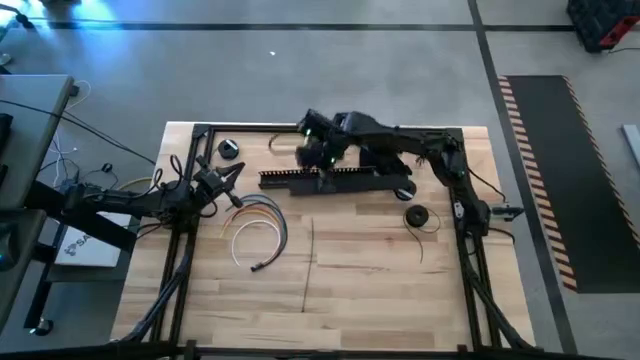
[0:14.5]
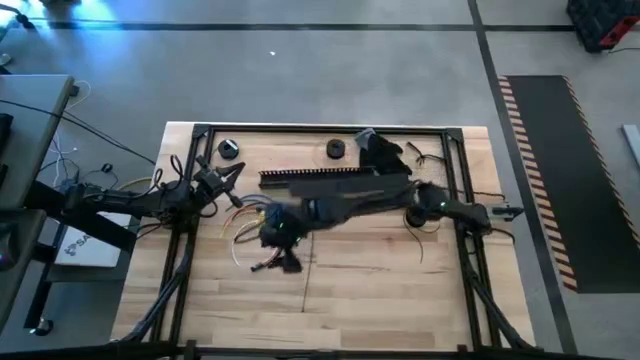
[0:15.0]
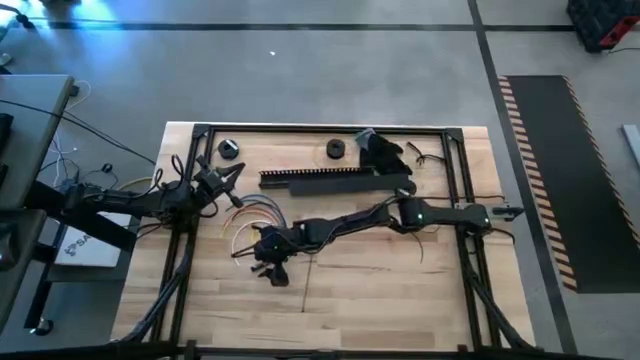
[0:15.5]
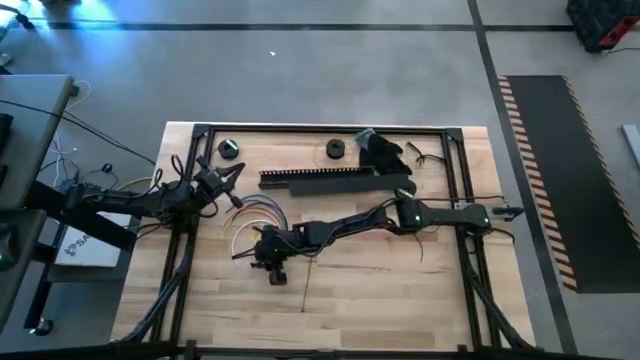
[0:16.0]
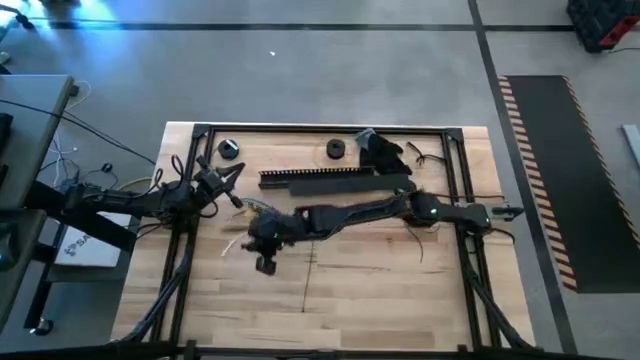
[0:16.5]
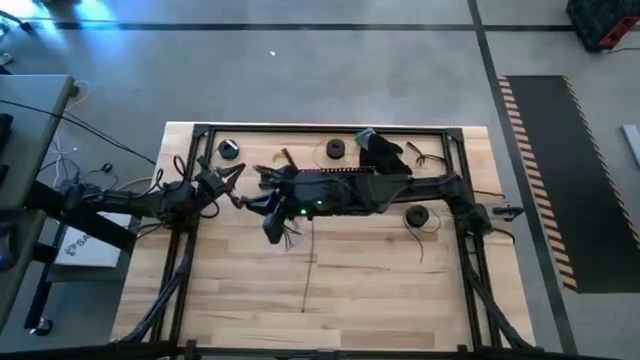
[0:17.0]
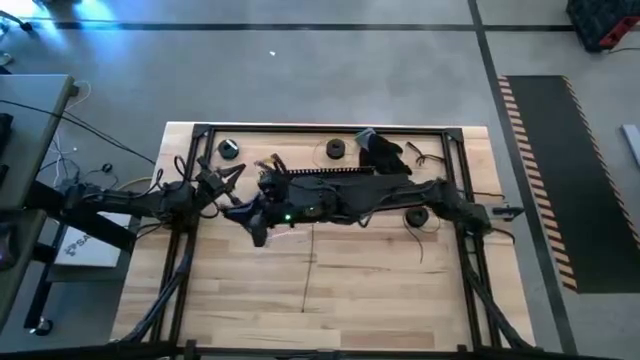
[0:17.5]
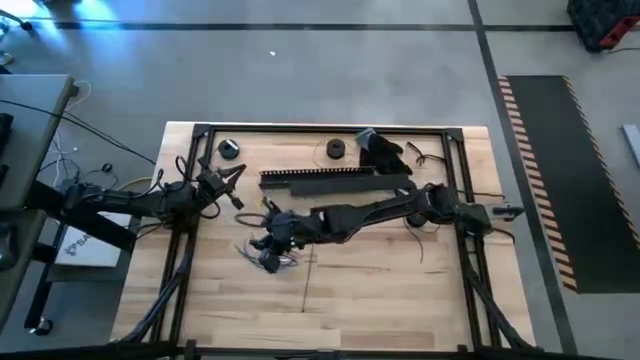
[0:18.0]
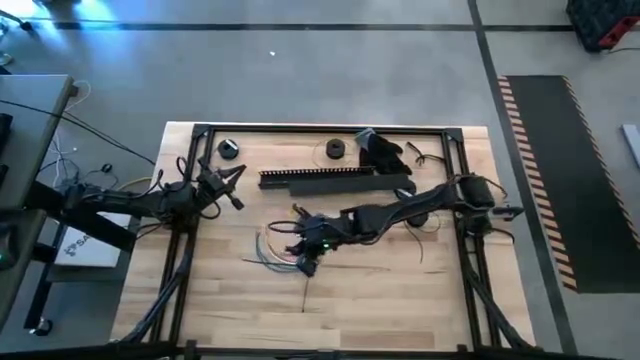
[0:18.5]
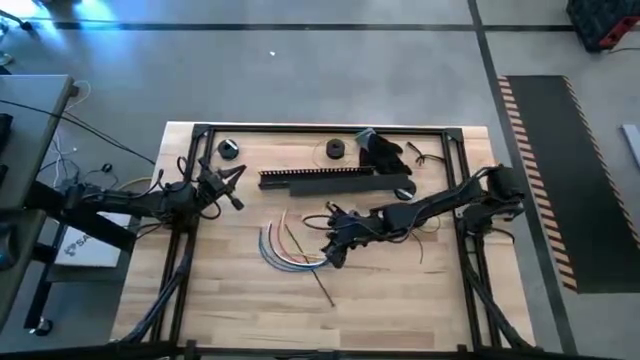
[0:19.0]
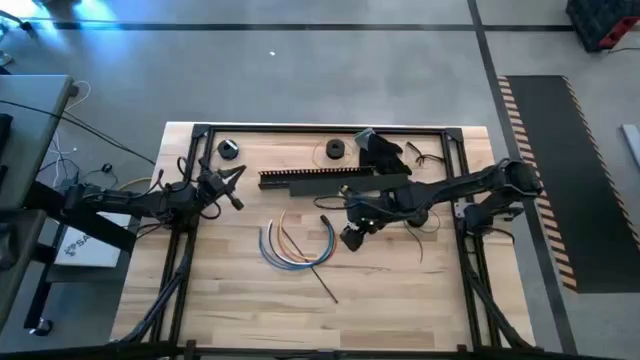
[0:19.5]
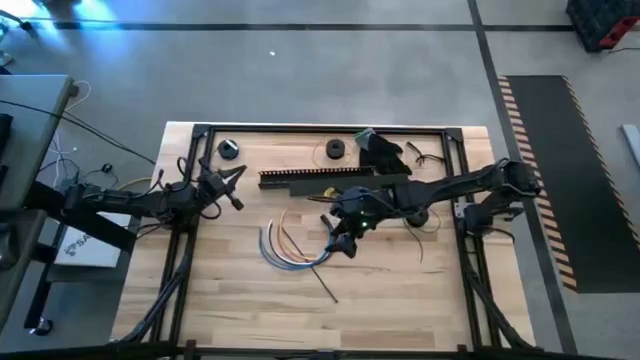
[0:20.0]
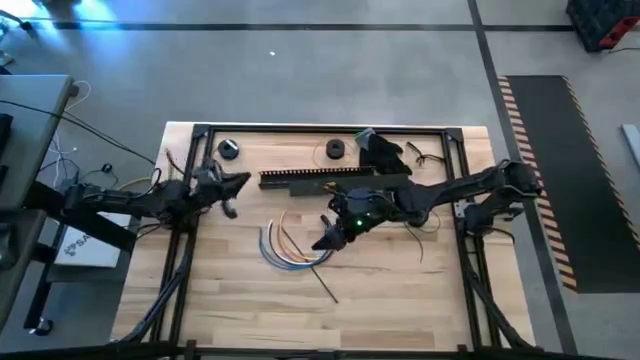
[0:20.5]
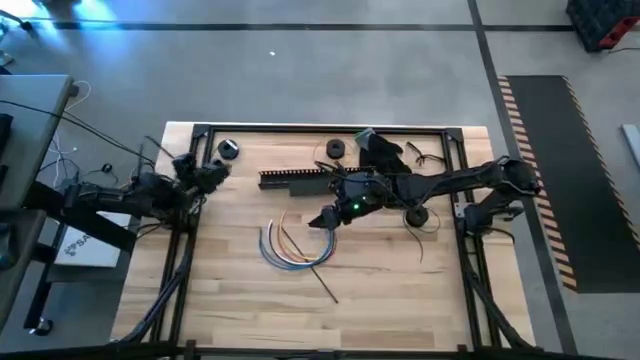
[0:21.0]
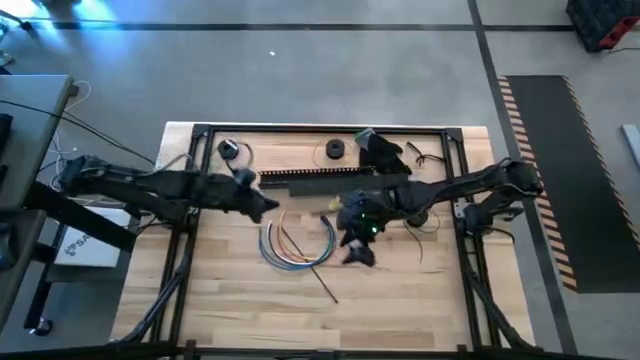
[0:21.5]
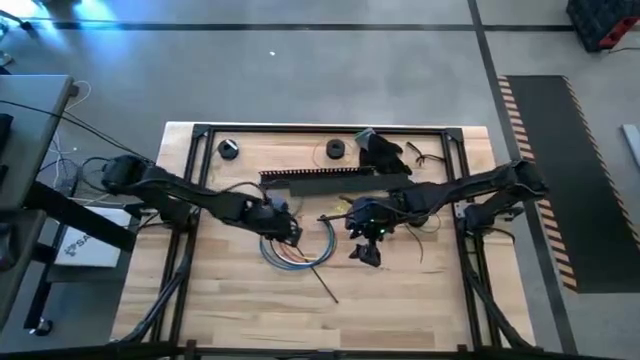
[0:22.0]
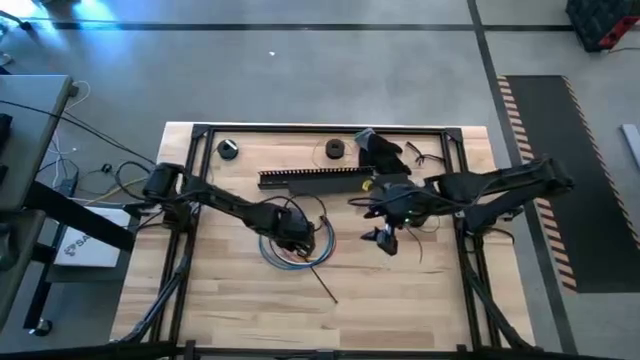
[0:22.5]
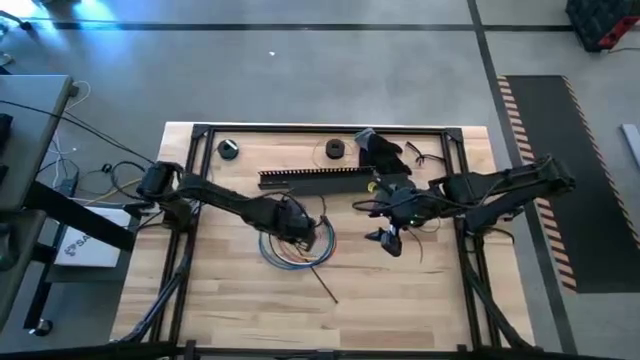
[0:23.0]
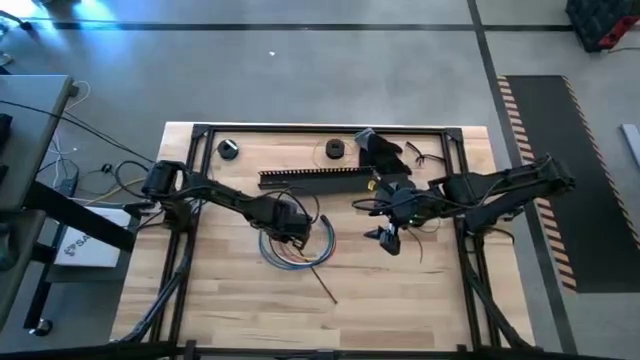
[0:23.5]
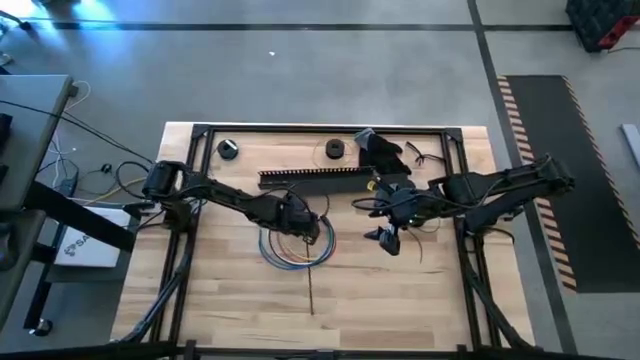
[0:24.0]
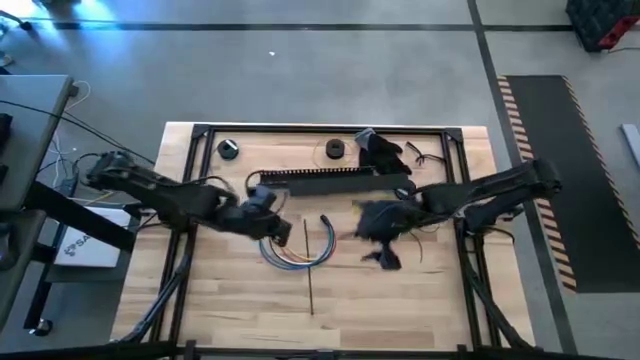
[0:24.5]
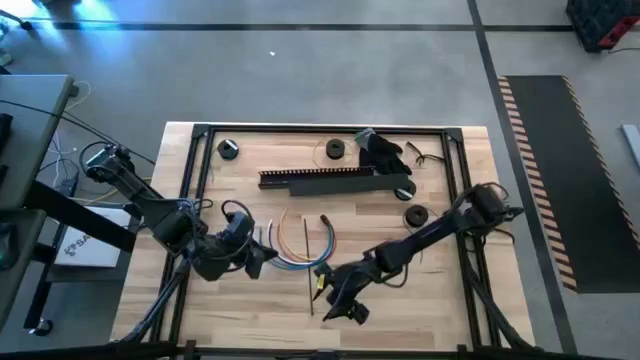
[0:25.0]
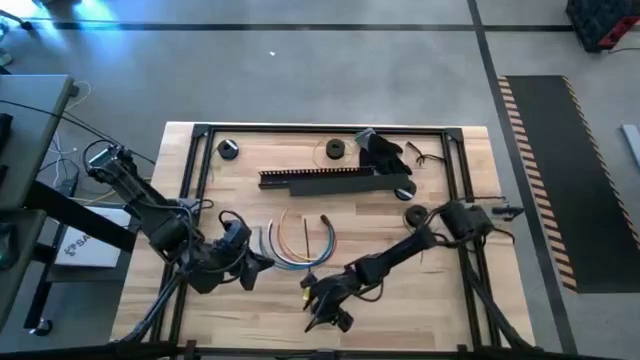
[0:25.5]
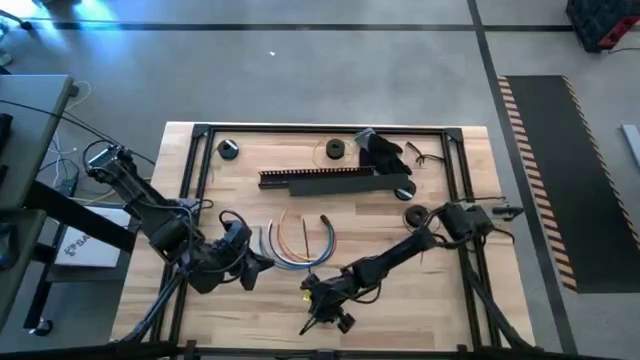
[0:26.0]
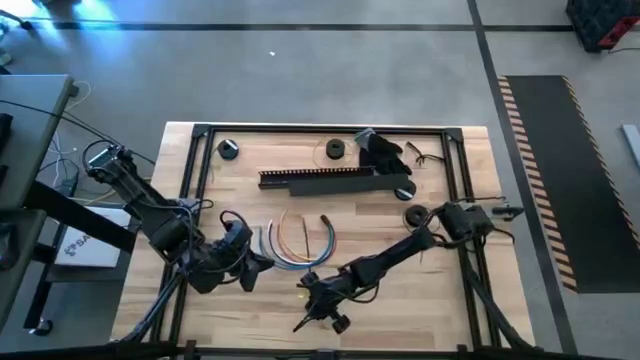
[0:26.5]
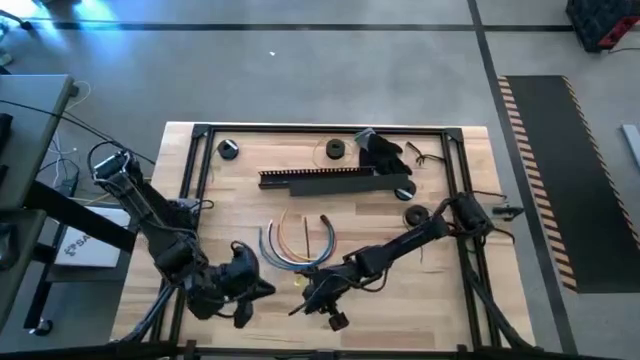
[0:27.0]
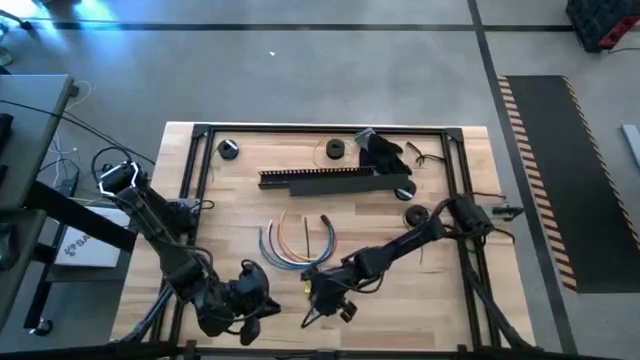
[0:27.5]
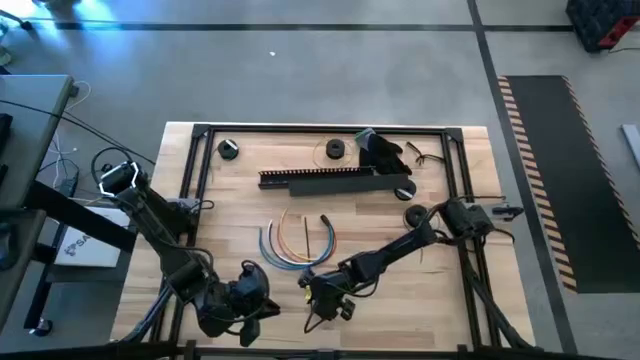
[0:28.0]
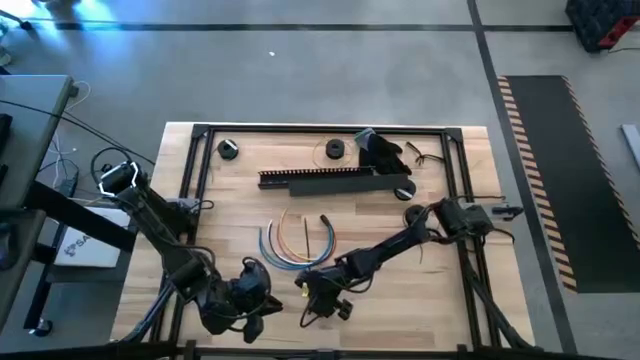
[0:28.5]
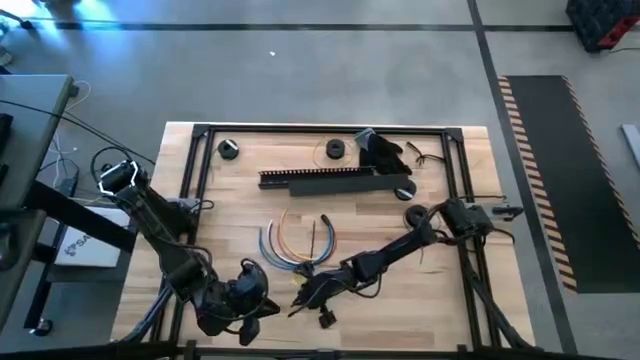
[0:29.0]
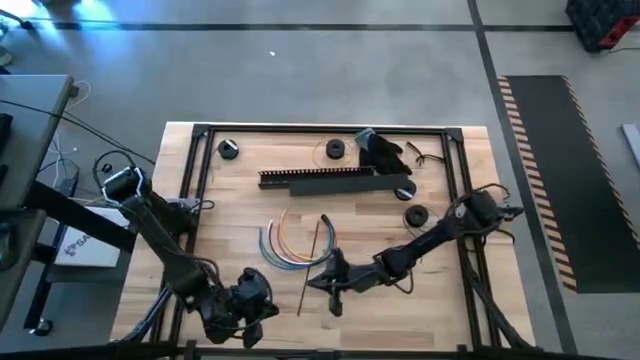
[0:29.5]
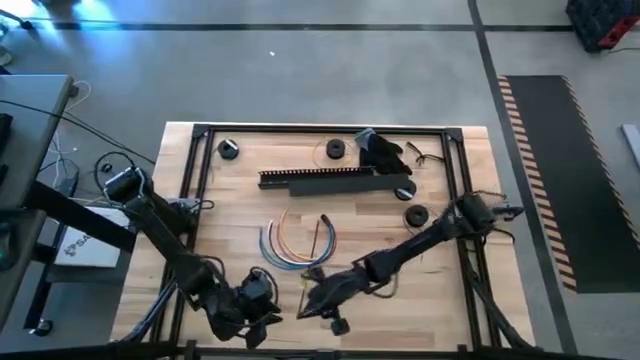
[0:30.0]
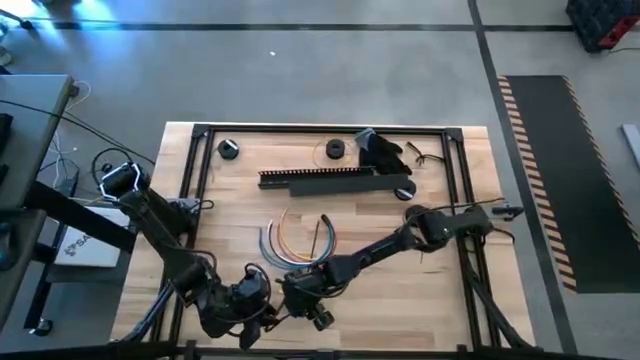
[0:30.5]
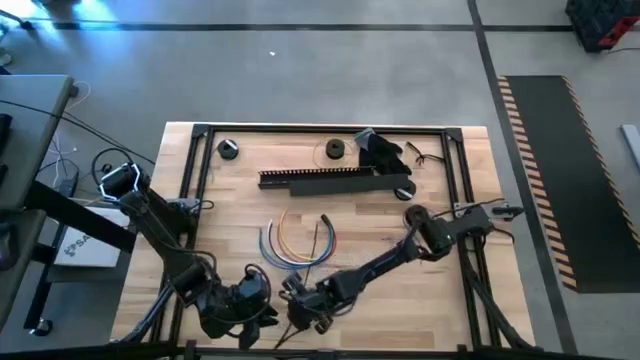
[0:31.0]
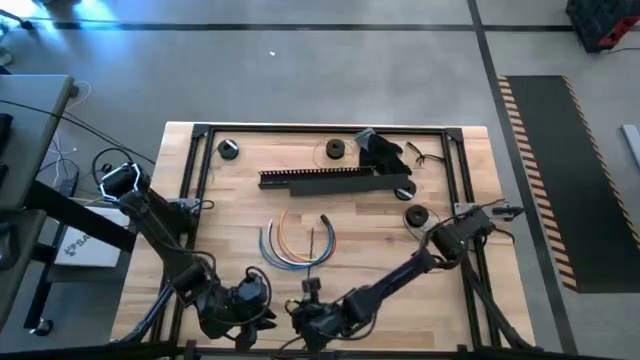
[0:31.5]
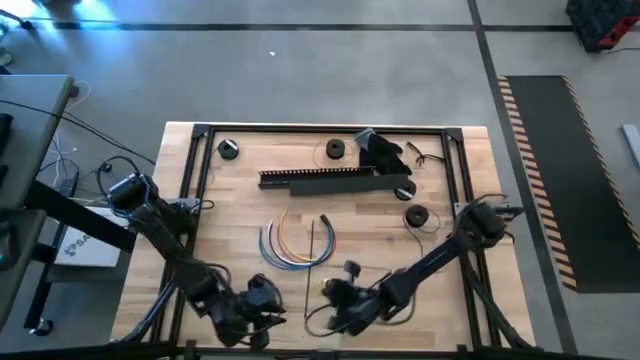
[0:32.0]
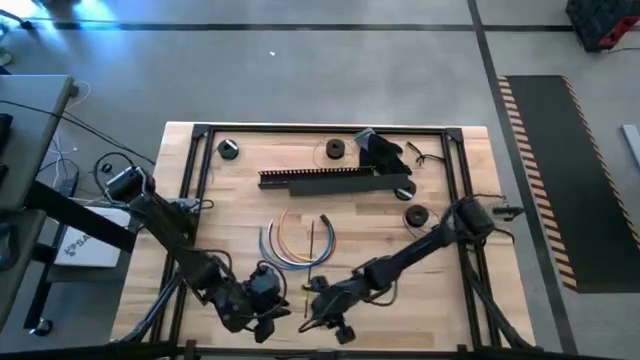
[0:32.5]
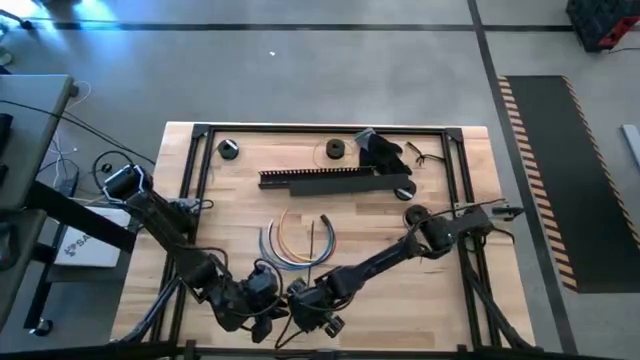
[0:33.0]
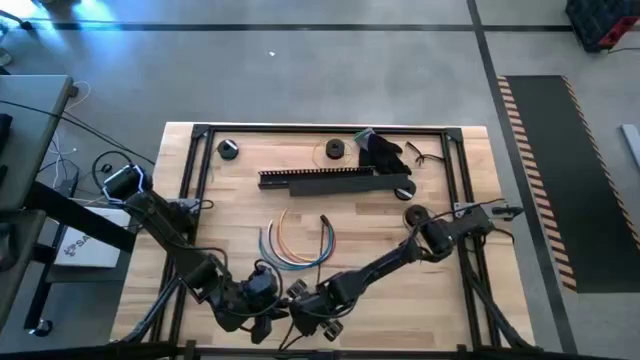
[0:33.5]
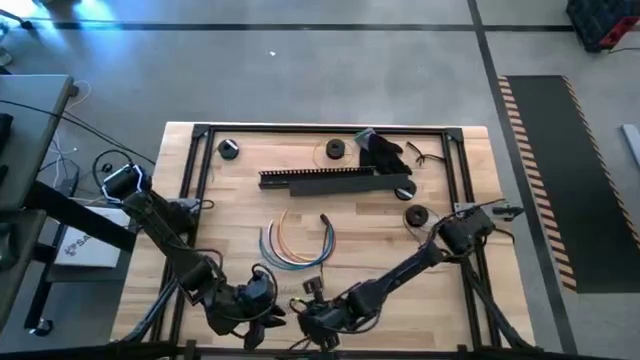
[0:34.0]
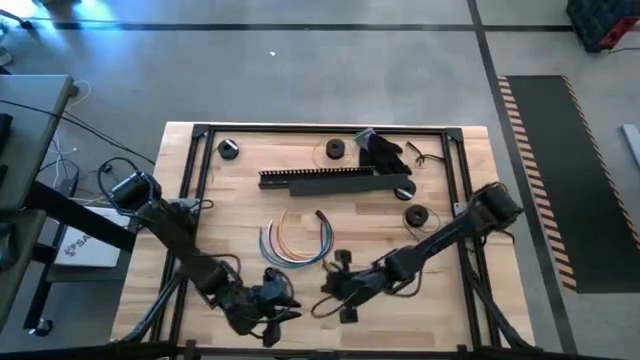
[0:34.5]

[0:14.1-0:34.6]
Task: Ziptie cables
Wrap the black zip tie around the cables
